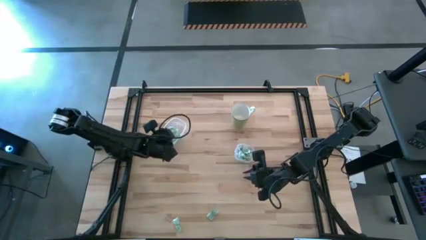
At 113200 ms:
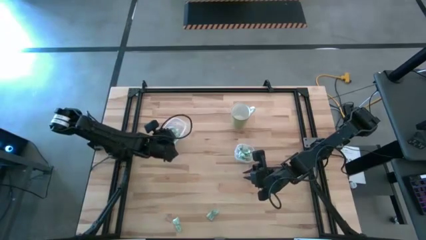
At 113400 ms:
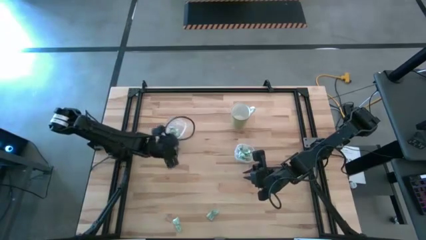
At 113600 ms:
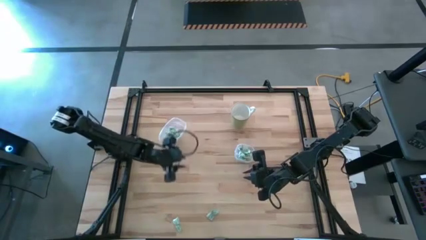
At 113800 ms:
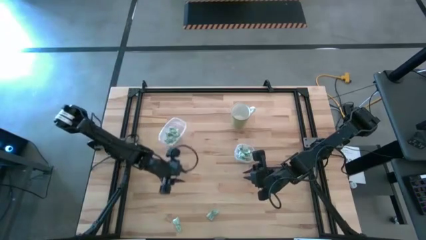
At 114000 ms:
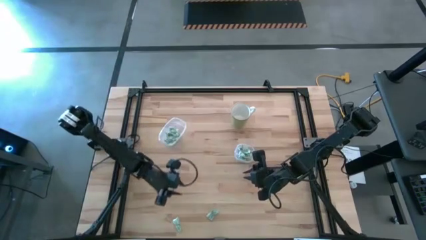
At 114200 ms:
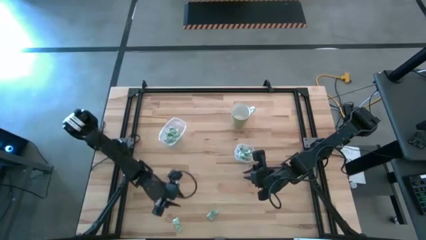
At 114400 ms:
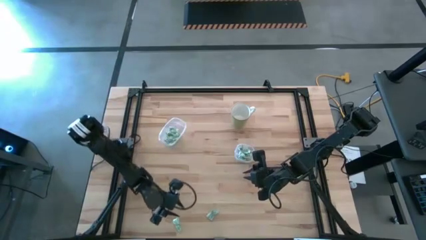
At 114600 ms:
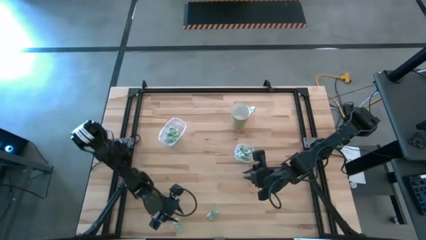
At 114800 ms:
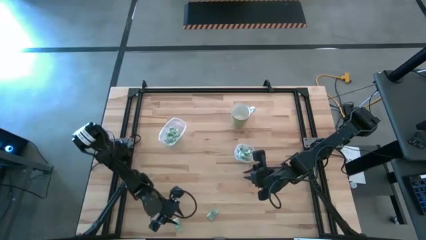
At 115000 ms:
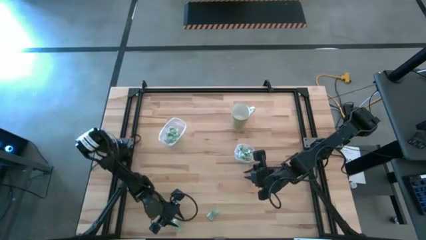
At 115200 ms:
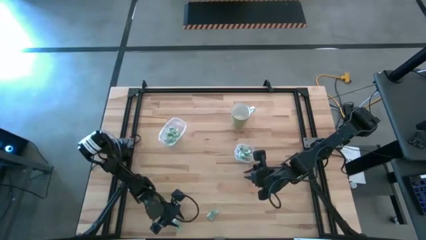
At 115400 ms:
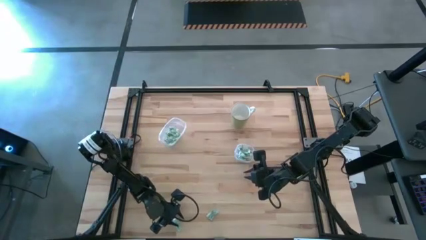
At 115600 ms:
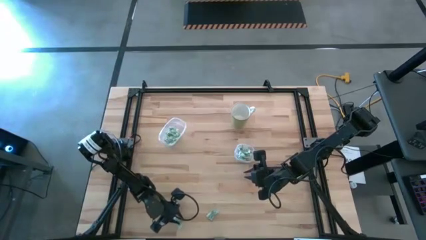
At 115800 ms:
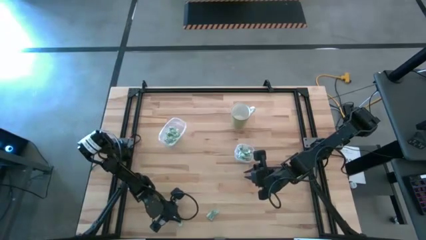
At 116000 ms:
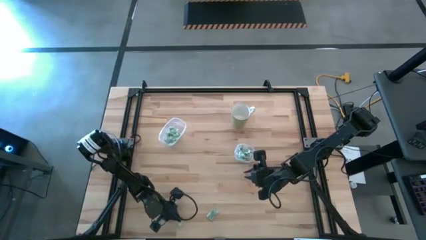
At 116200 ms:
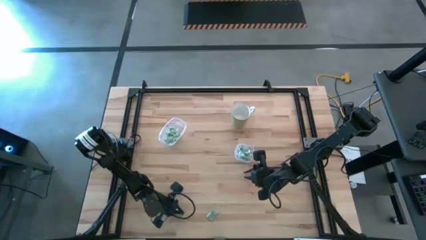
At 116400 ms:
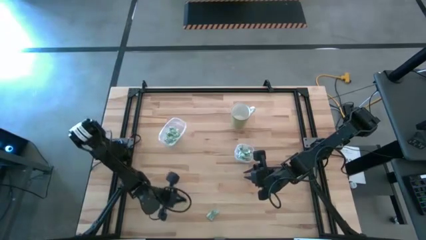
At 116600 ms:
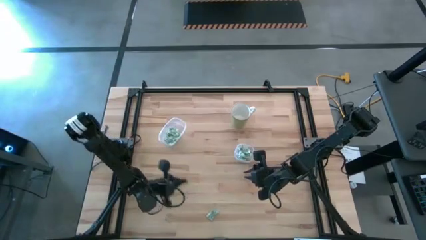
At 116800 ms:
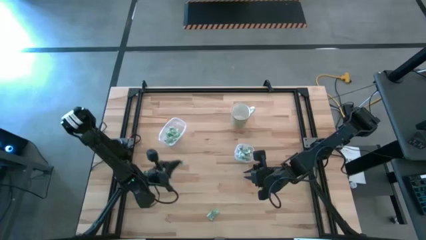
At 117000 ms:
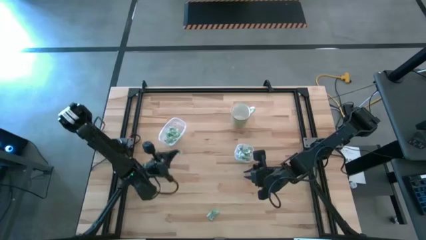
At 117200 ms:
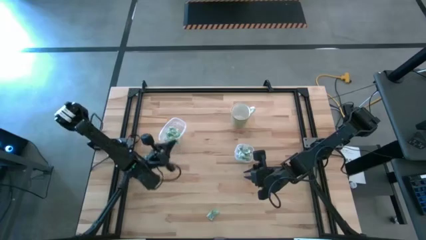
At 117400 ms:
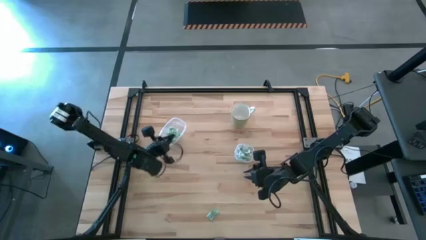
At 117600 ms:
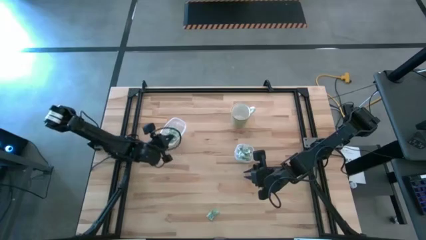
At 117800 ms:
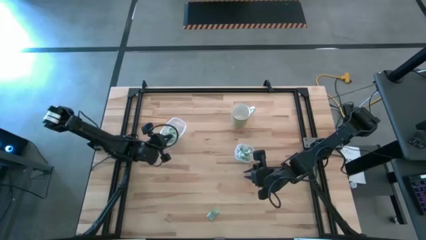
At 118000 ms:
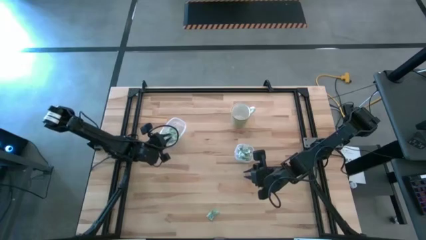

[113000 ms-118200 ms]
Task: Pick and place Stevia / Truvia into bins
Put the stevia packet into the left transparent container

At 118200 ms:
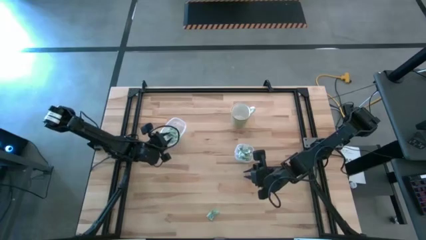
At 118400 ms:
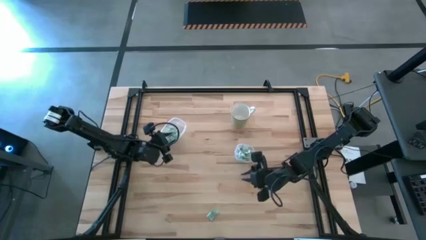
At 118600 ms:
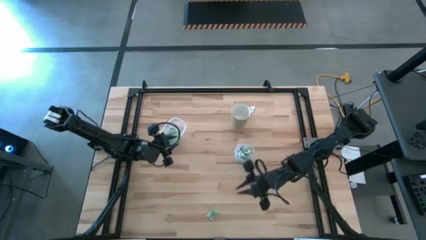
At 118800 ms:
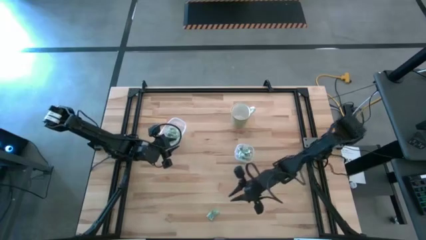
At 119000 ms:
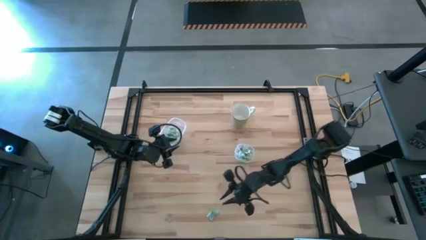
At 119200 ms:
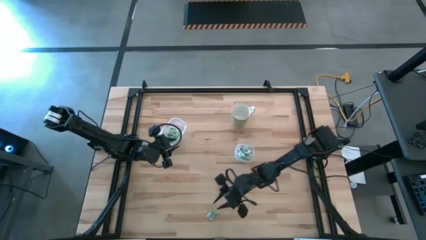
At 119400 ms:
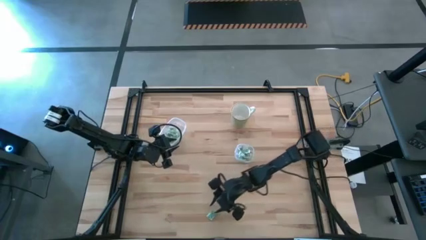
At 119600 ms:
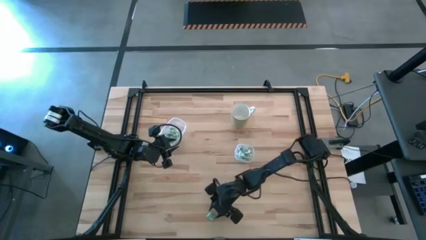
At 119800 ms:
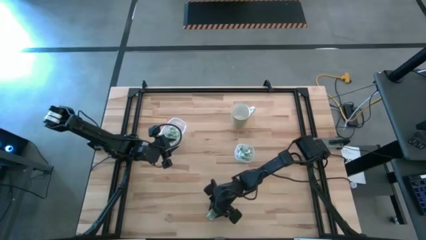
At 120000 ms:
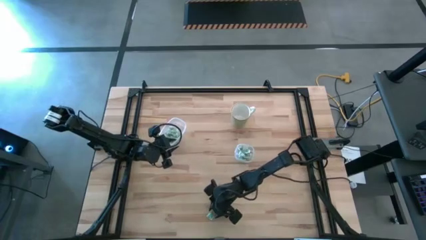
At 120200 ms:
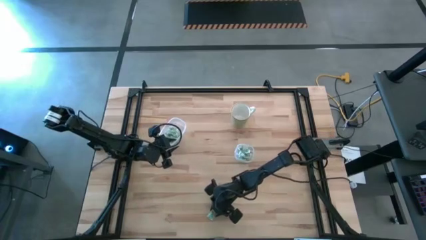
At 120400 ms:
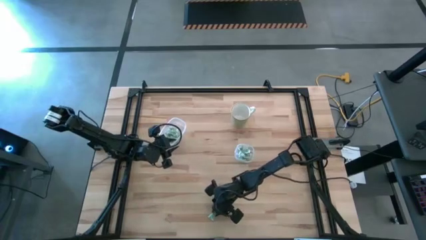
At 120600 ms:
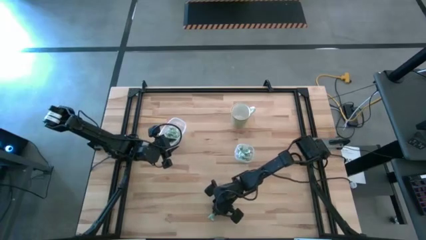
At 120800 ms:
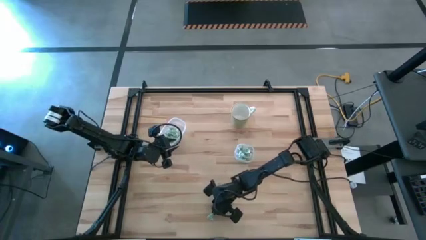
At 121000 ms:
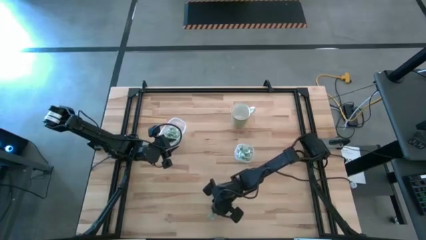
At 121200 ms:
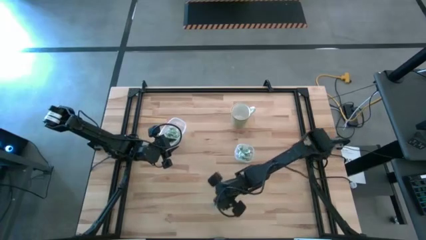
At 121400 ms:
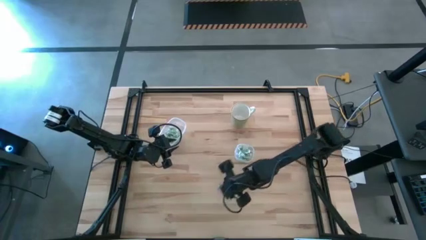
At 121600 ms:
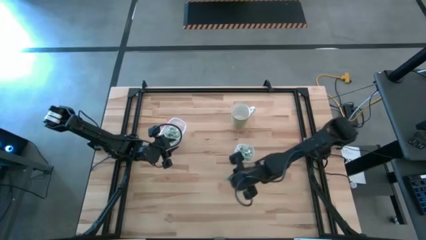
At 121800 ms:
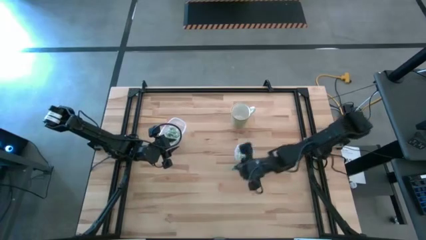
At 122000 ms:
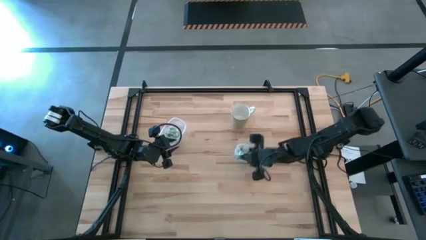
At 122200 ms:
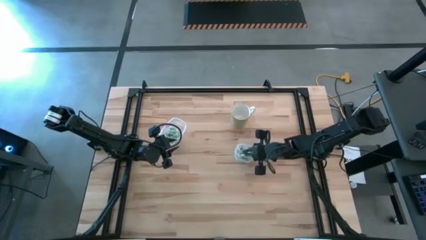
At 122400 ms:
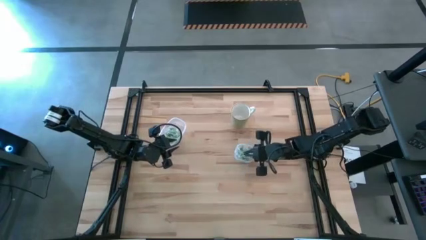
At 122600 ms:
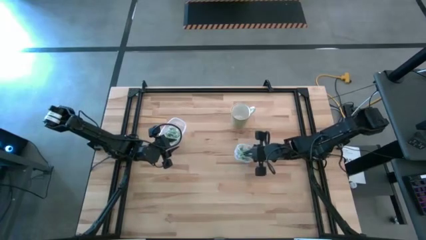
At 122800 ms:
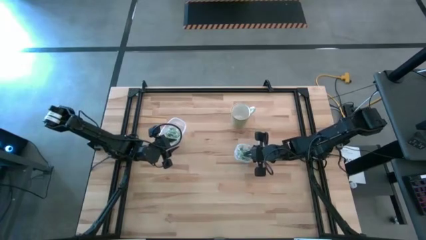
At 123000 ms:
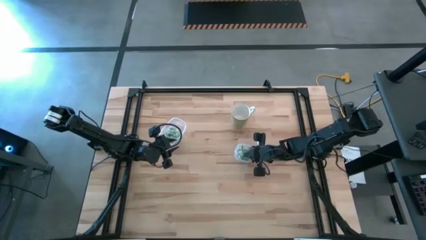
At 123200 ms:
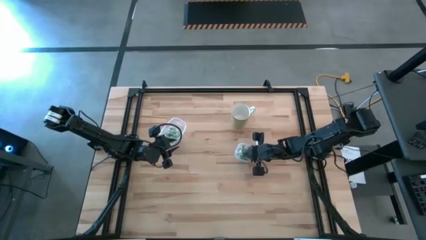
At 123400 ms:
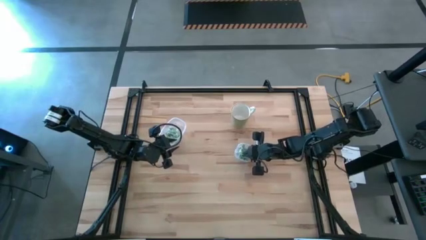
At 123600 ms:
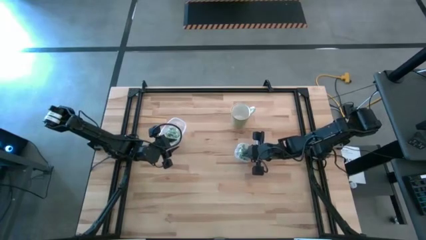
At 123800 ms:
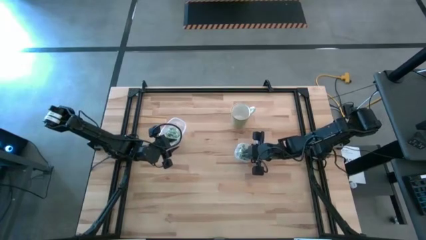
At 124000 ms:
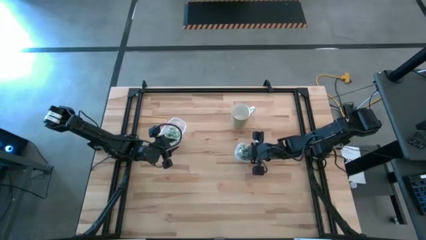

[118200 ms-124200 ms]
Put the stevia packet into the right transparent container

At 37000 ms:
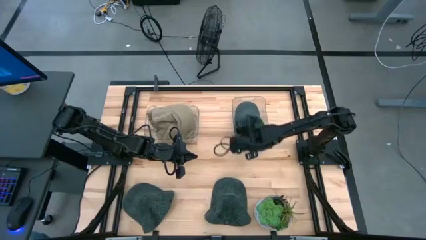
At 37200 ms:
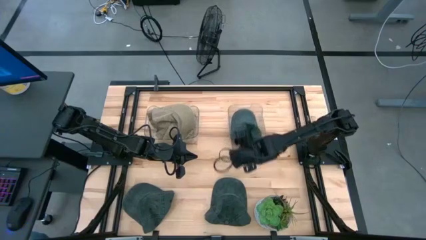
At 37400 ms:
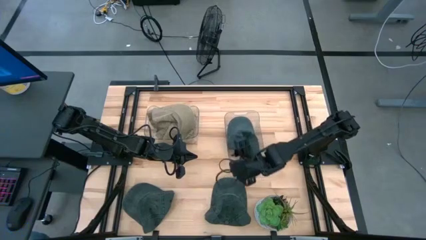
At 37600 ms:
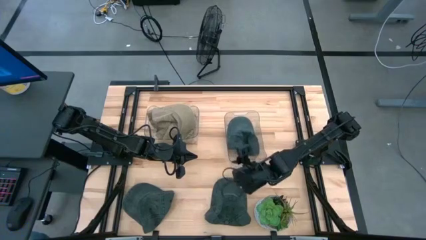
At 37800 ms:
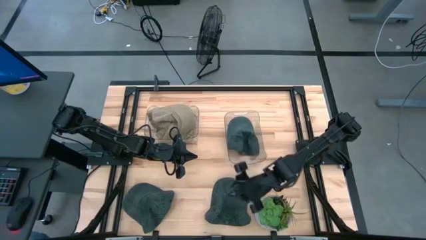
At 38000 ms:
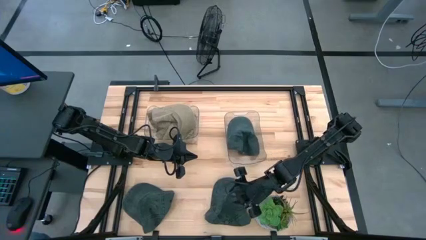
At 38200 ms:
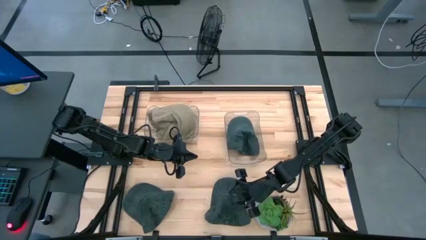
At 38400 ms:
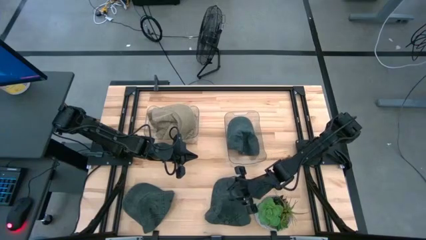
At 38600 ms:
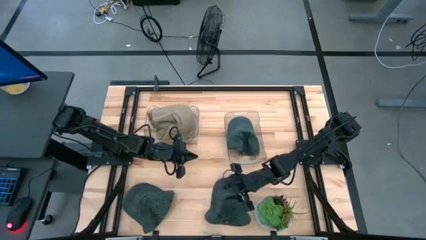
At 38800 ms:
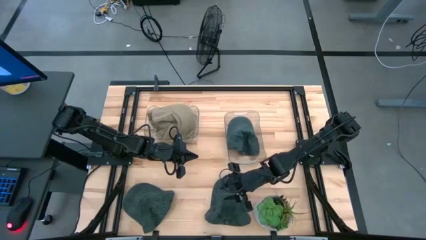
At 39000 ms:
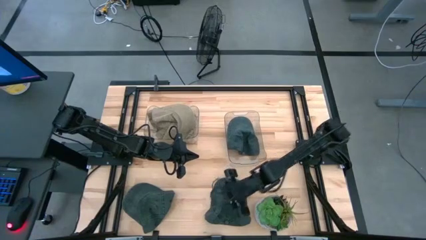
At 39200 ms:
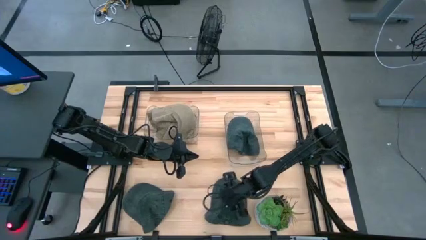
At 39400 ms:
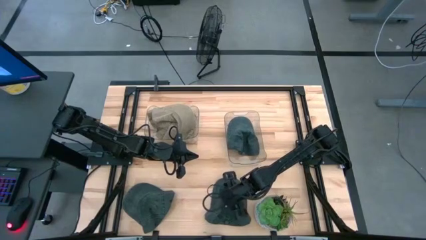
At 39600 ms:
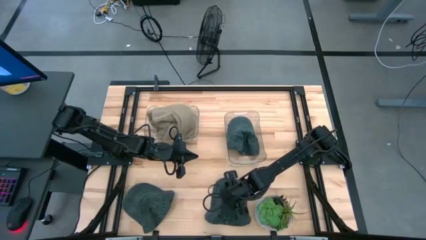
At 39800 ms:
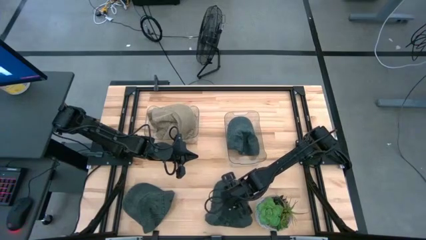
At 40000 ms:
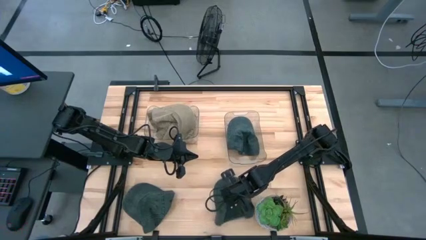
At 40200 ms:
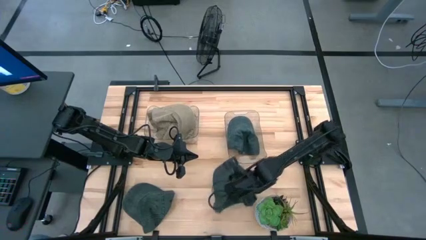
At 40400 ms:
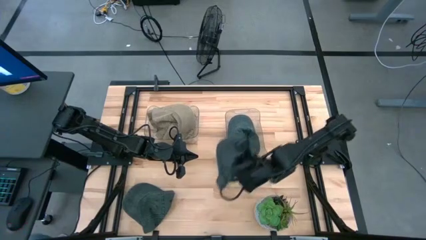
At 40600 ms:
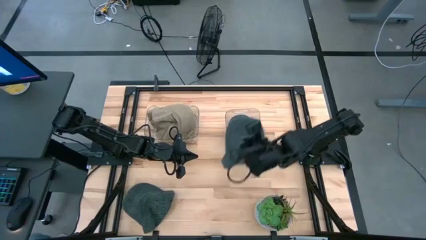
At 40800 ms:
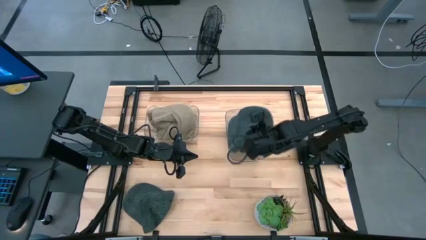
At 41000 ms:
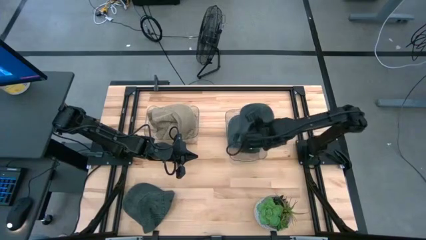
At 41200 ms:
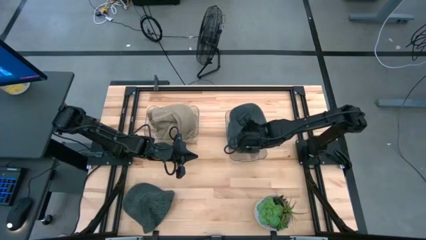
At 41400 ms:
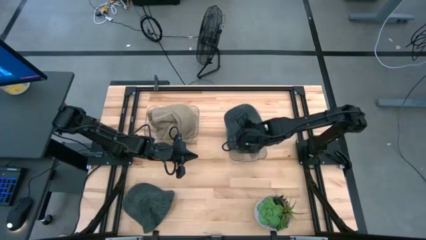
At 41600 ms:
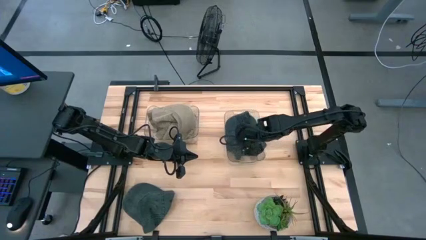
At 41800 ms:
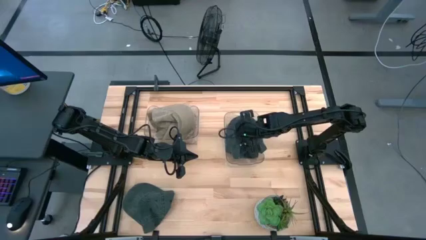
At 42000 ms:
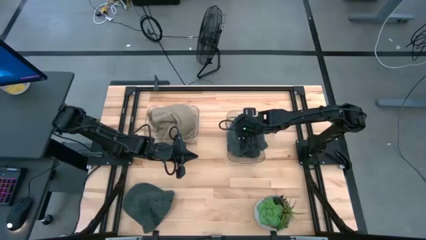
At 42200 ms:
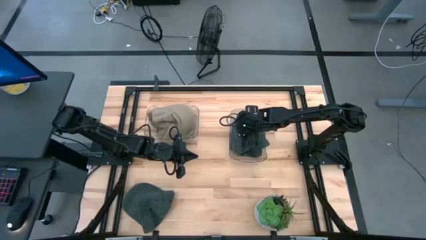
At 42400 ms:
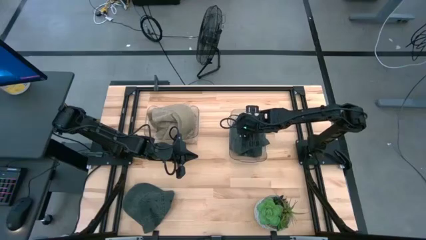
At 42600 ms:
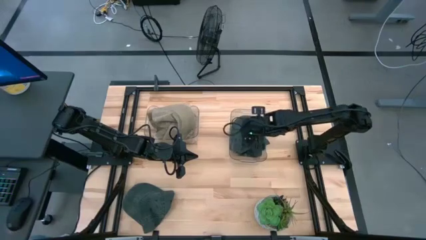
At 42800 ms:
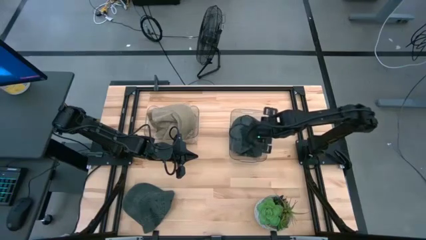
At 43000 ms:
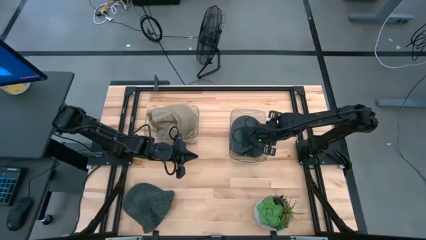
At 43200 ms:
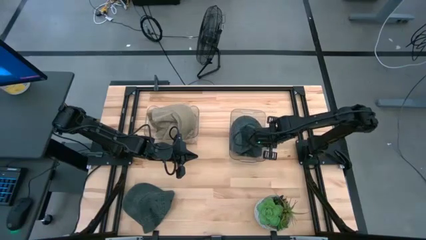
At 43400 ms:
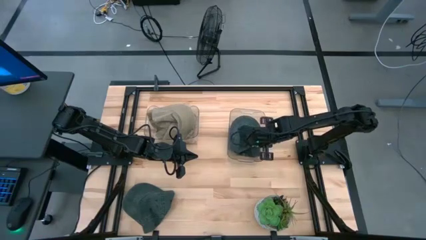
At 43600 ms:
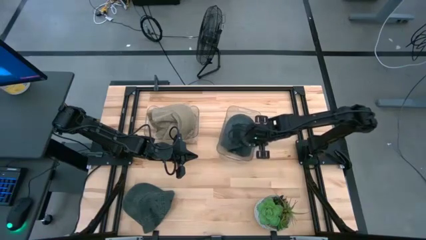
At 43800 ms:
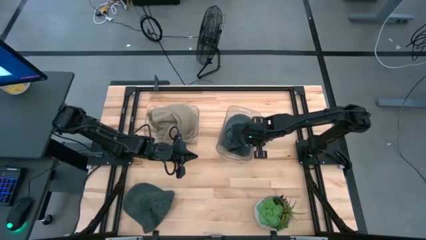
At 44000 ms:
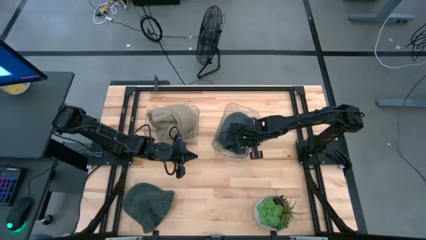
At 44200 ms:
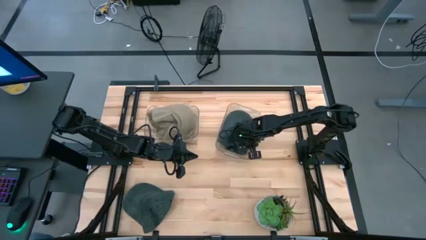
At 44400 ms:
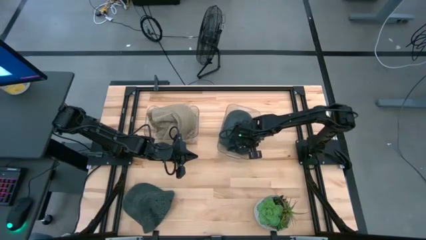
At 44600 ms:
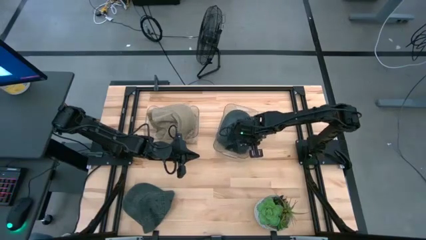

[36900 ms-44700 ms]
Task: Pick & Place hat
Stack the right black cap into the right transparent bin
